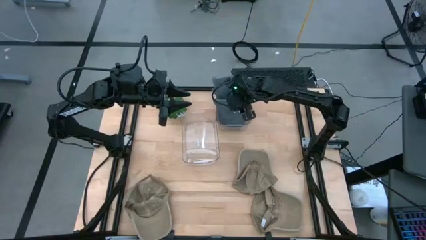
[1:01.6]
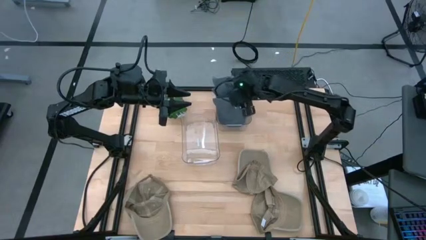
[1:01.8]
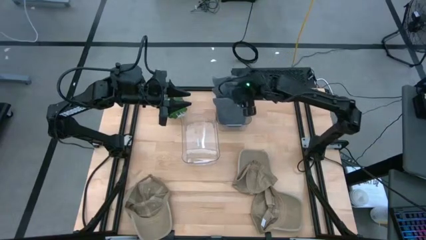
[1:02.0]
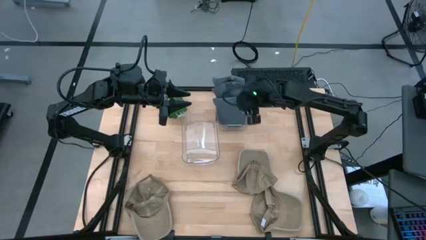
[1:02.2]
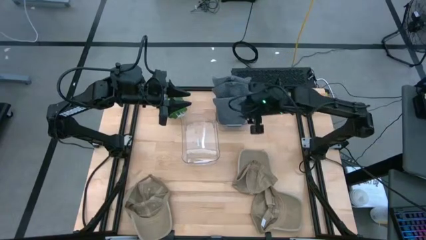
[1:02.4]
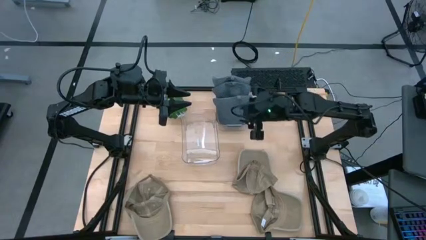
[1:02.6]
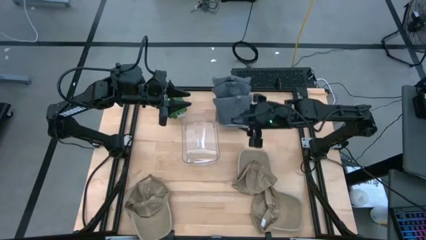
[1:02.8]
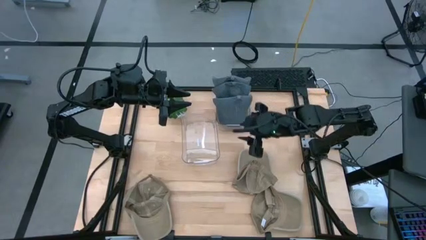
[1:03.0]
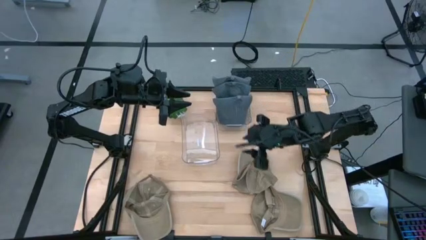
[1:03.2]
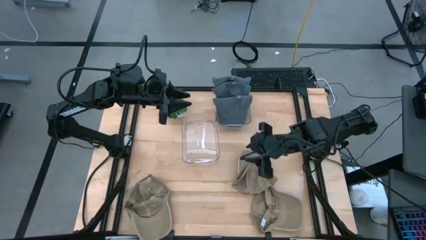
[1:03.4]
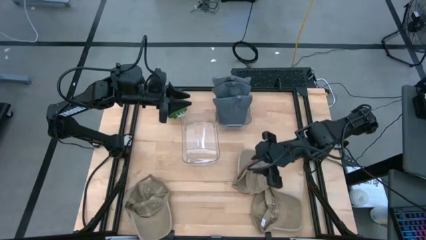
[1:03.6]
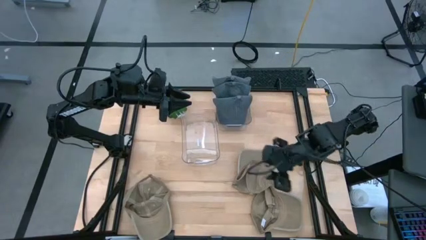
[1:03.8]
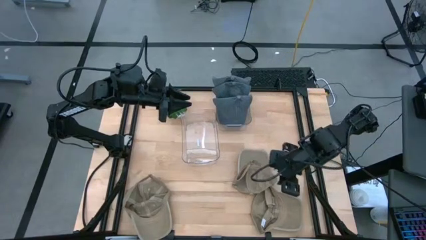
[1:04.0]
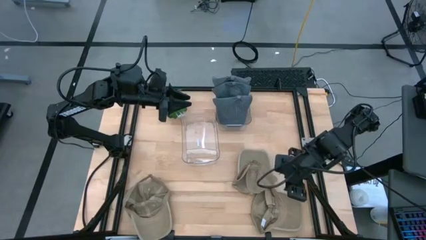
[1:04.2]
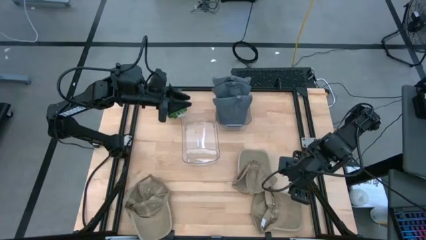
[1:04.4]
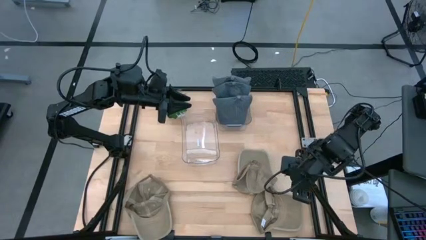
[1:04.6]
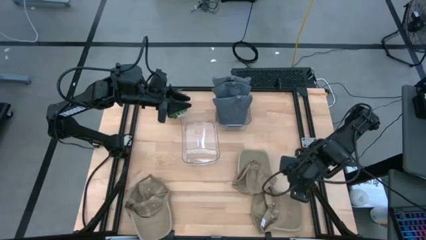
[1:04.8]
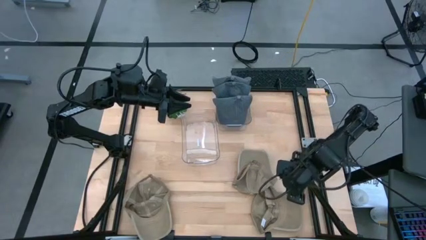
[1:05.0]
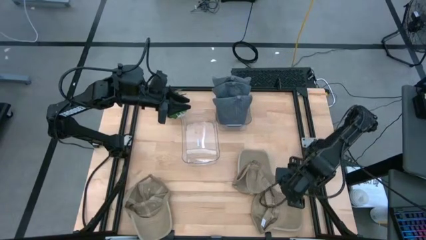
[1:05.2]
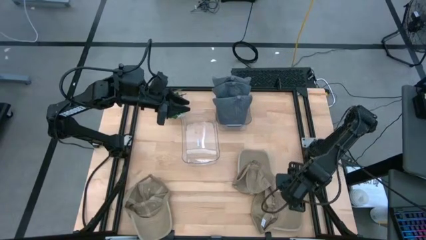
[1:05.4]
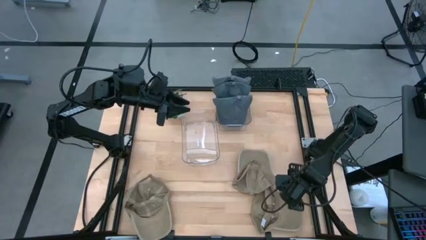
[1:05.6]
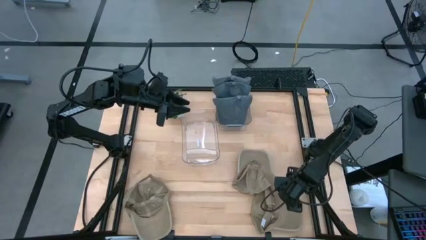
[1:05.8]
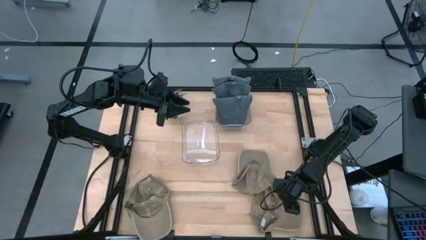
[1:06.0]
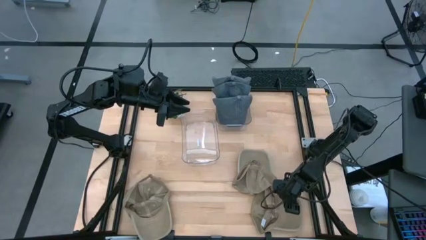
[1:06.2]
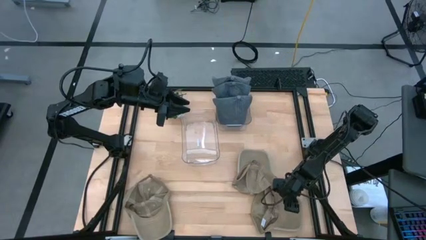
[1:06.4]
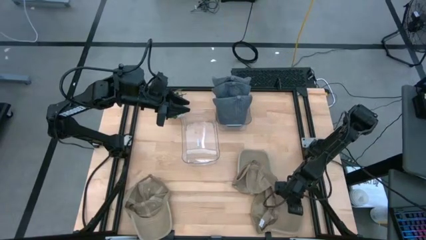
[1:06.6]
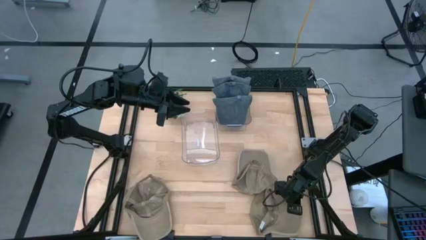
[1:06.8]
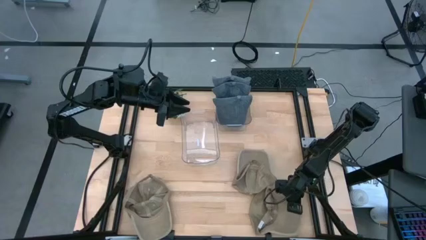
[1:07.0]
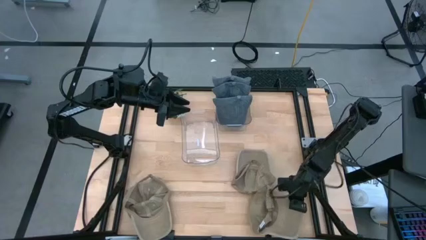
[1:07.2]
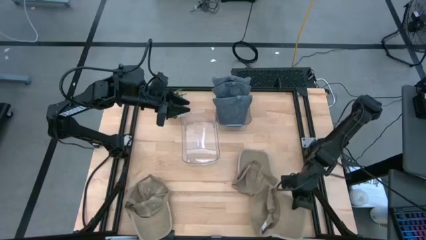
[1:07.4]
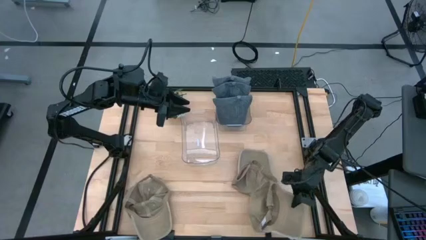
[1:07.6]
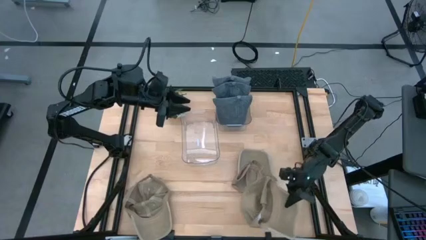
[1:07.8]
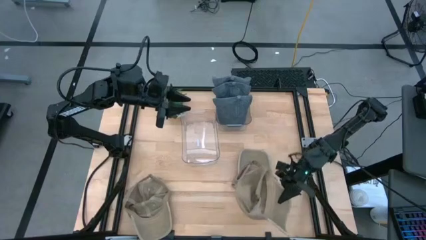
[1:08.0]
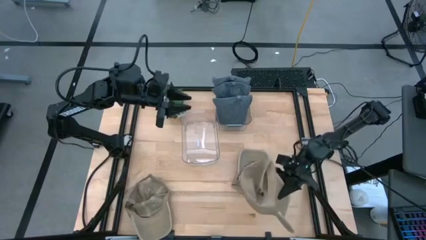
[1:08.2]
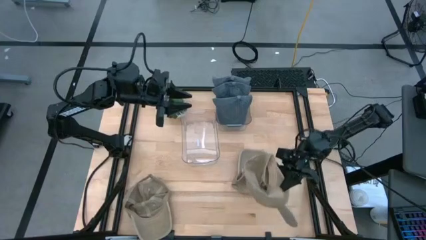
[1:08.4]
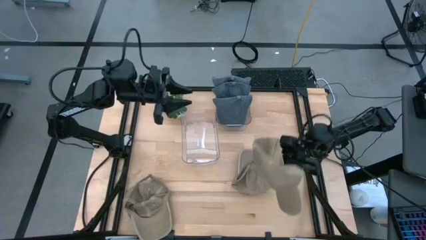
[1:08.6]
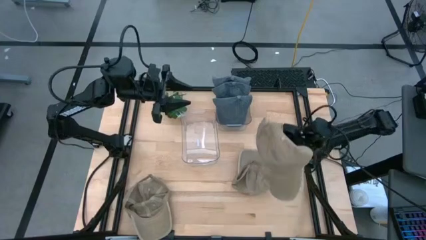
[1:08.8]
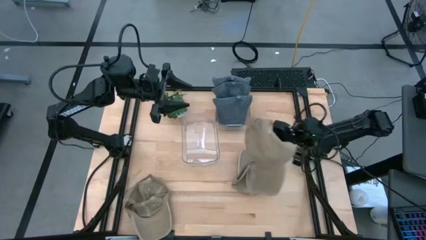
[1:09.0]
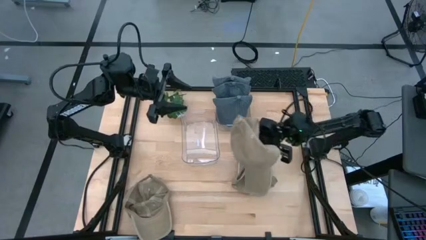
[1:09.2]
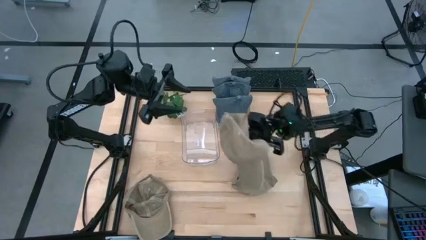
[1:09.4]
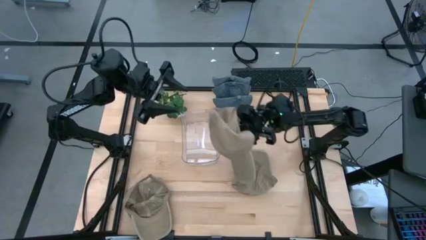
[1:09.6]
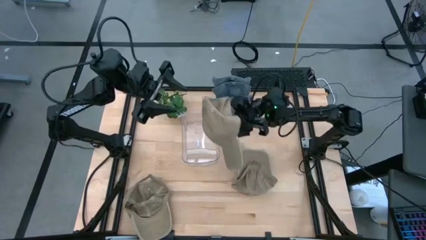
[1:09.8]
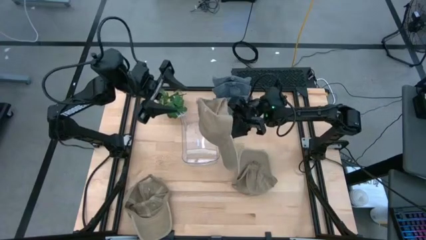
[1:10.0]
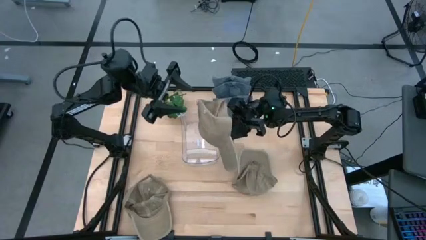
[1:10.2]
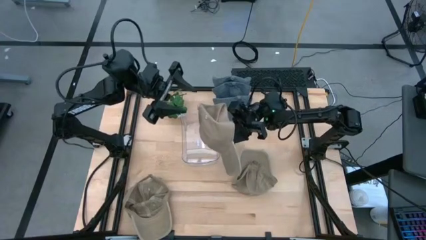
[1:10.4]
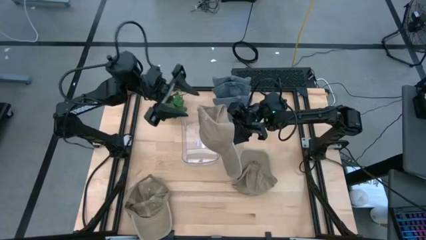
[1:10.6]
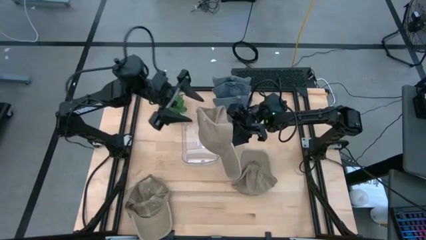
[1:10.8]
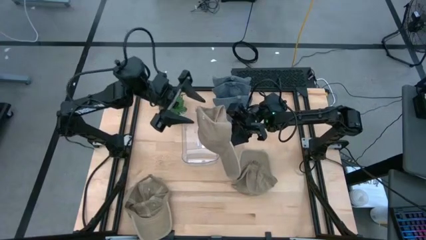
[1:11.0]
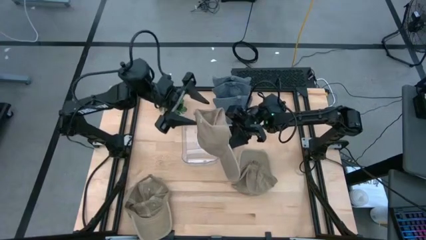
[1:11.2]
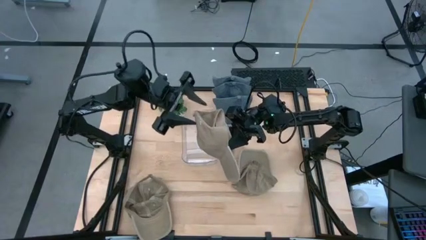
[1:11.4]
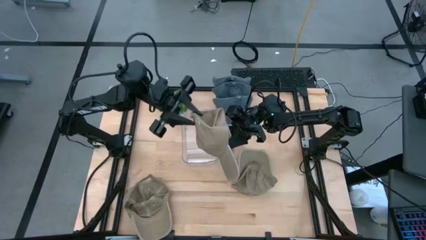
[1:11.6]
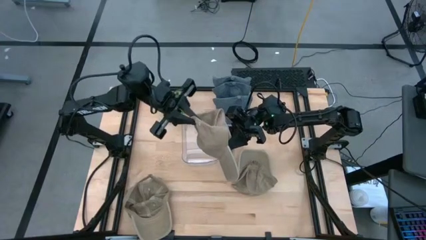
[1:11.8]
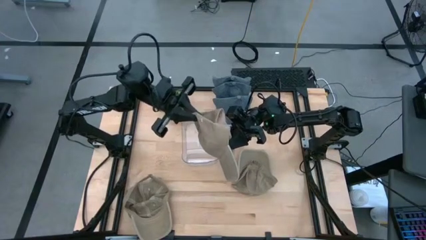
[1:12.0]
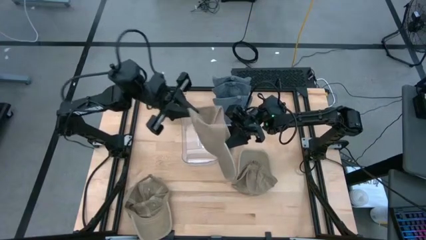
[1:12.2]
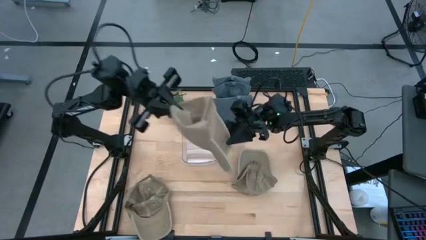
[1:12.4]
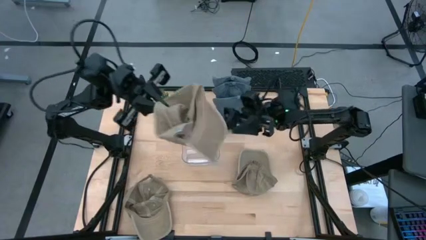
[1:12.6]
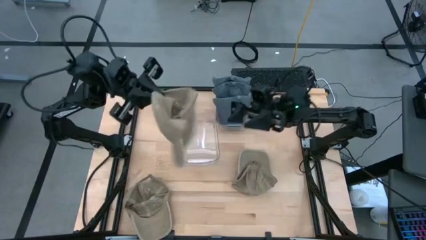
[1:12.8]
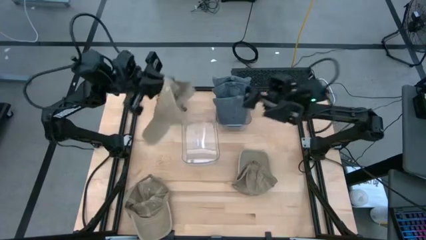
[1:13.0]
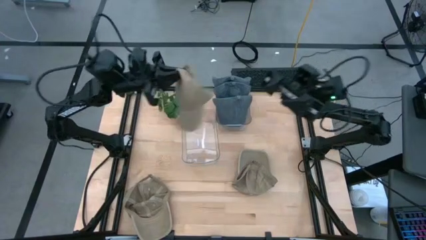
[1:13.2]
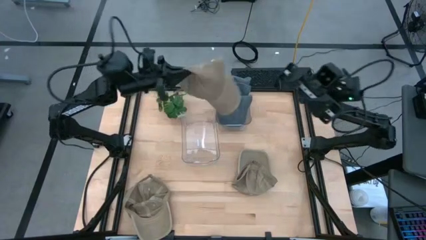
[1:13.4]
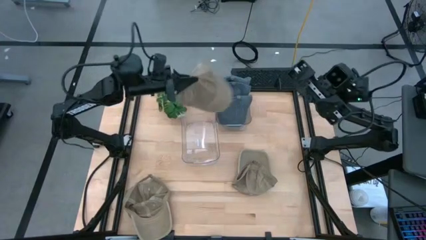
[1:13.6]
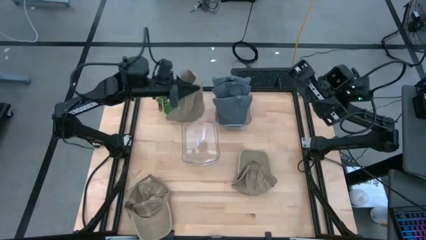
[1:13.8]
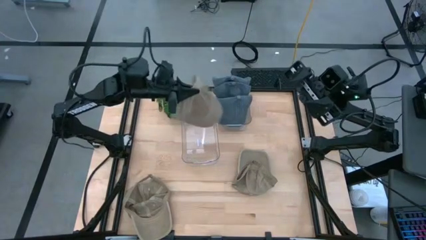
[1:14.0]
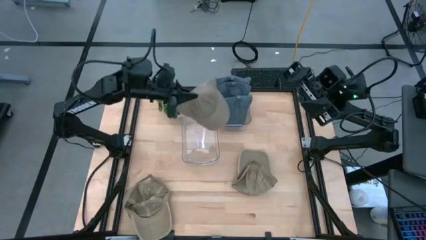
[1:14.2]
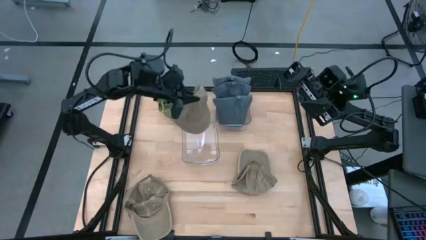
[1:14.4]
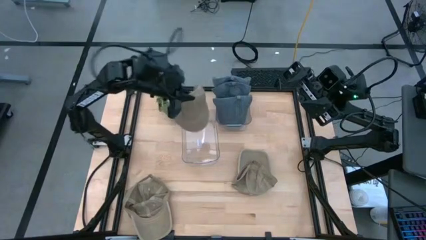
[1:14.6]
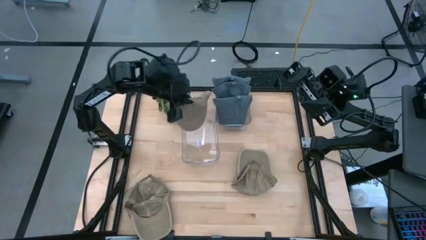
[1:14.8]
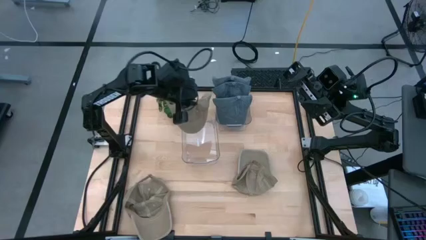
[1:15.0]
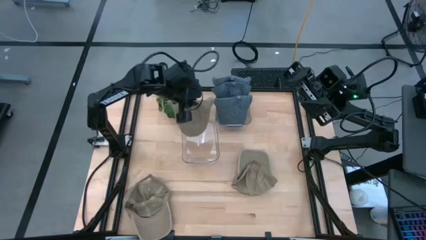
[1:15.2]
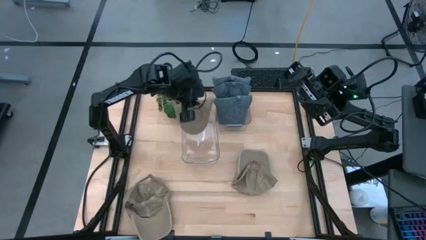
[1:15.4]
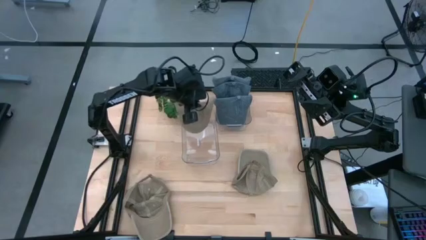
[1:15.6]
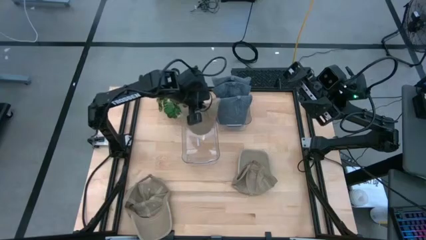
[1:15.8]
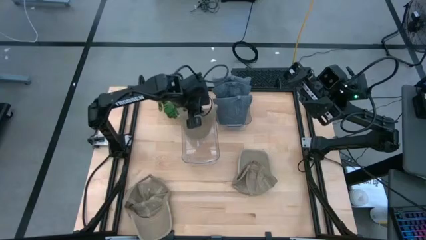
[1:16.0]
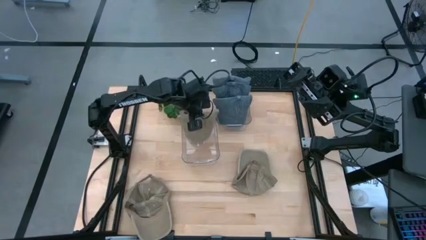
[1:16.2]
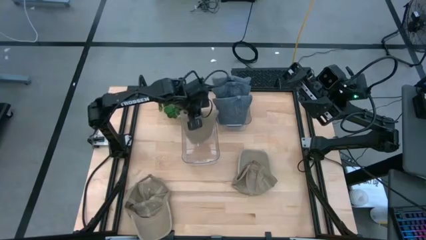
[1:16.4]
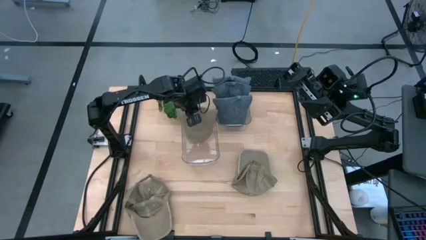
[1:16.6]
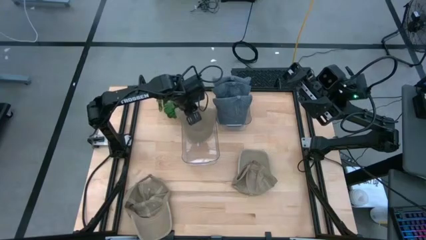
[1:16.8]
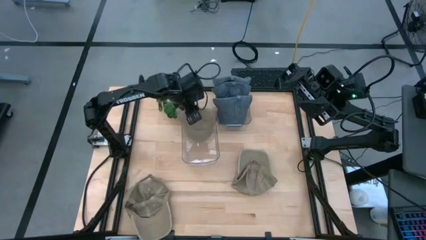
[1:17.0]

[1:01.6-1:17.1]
Task: Pick & Place hat
Put the bottom right brown cap into the left transparent bin
